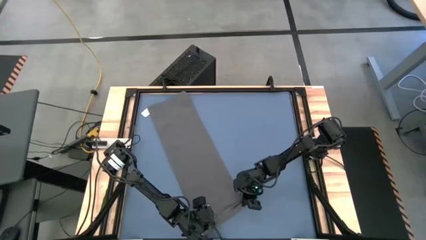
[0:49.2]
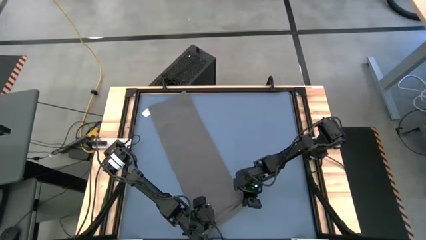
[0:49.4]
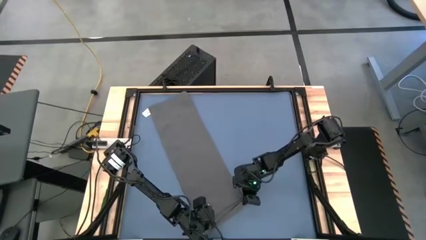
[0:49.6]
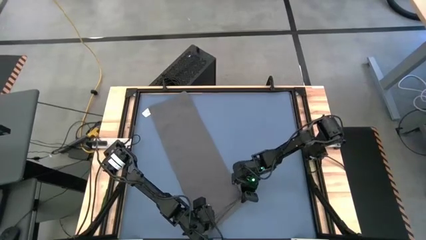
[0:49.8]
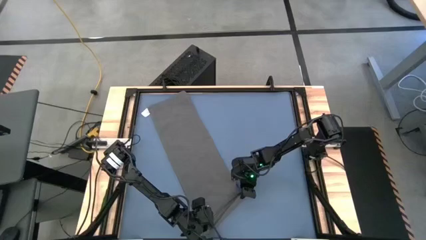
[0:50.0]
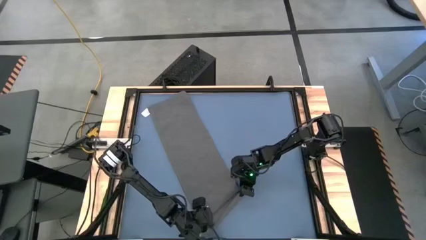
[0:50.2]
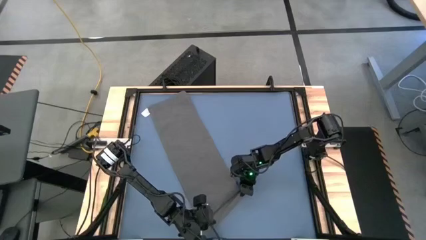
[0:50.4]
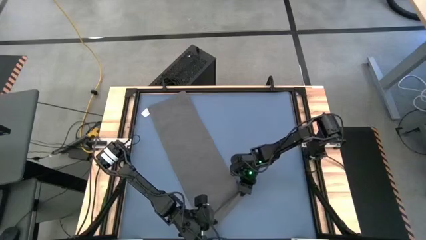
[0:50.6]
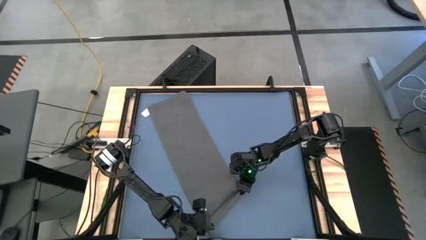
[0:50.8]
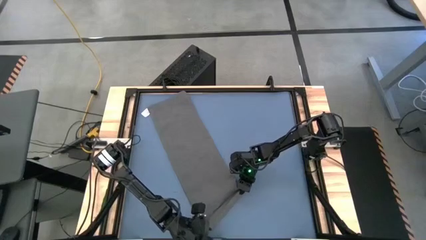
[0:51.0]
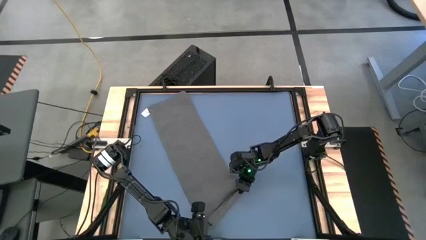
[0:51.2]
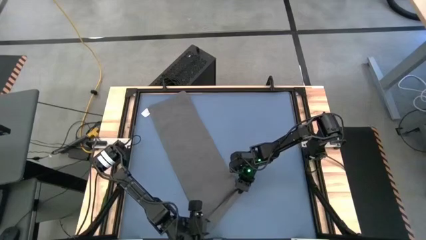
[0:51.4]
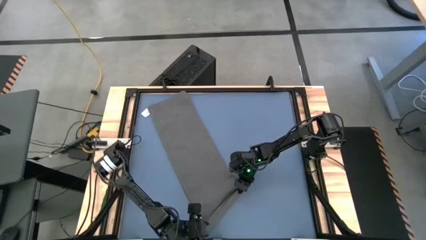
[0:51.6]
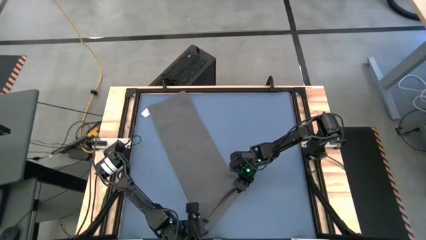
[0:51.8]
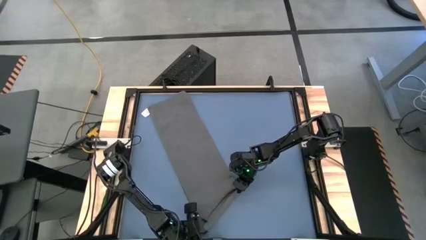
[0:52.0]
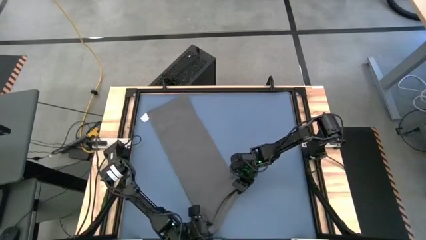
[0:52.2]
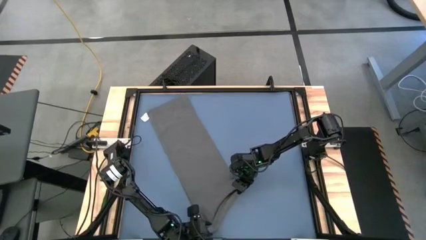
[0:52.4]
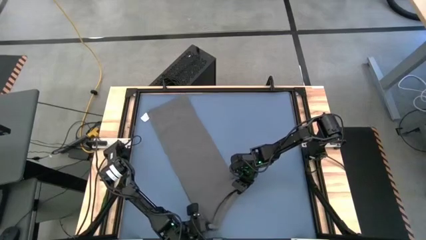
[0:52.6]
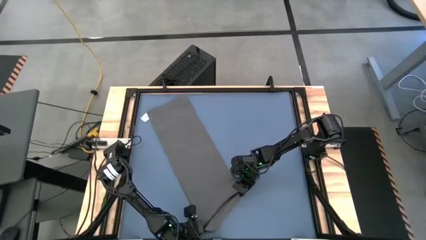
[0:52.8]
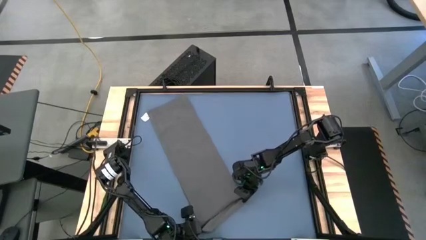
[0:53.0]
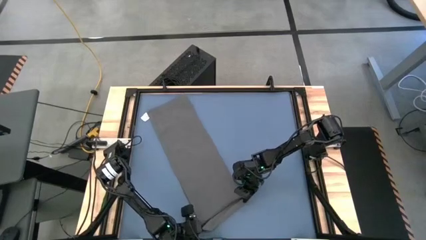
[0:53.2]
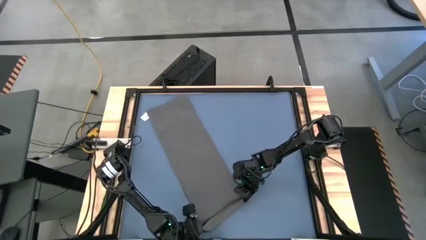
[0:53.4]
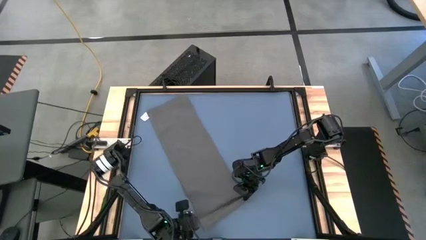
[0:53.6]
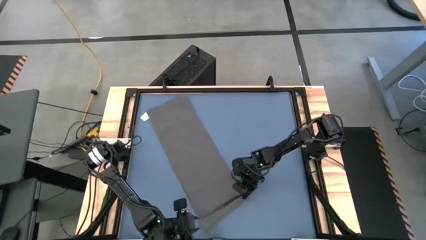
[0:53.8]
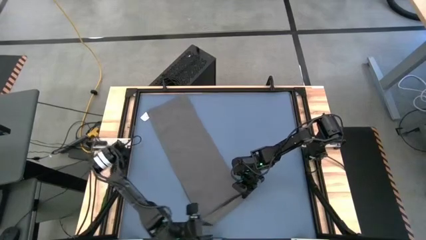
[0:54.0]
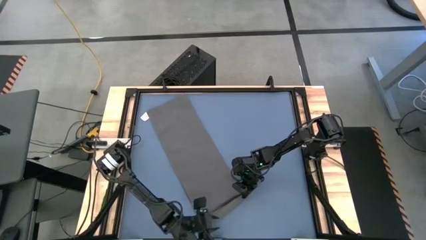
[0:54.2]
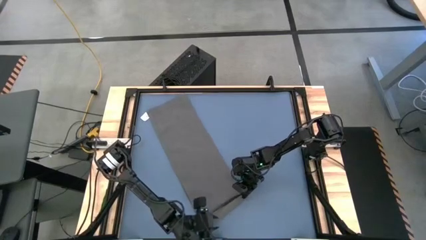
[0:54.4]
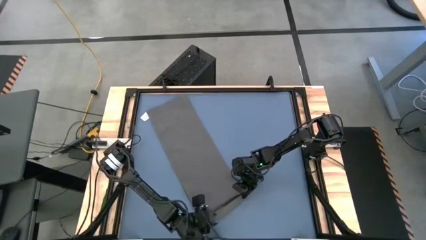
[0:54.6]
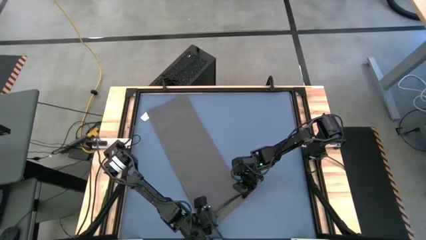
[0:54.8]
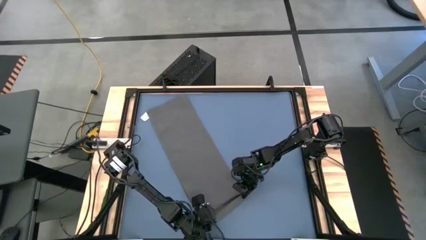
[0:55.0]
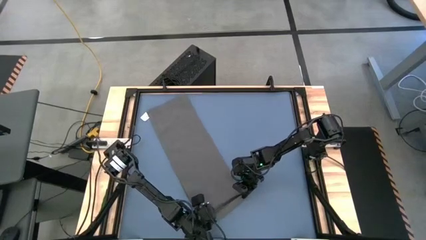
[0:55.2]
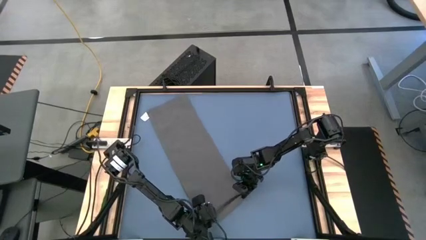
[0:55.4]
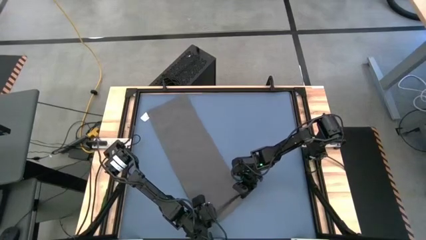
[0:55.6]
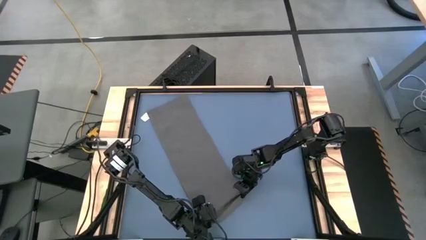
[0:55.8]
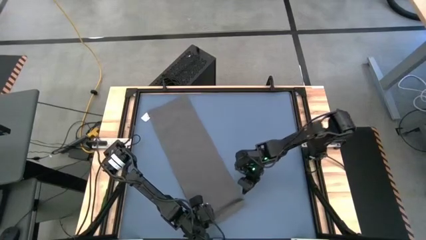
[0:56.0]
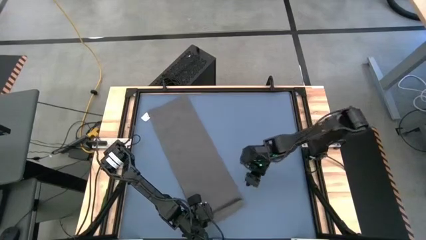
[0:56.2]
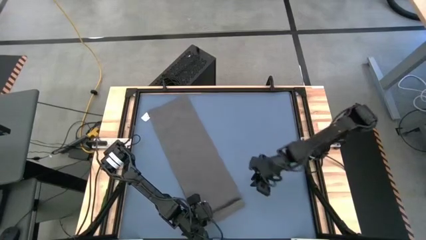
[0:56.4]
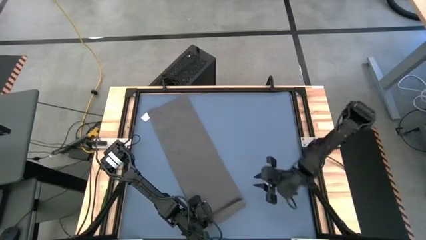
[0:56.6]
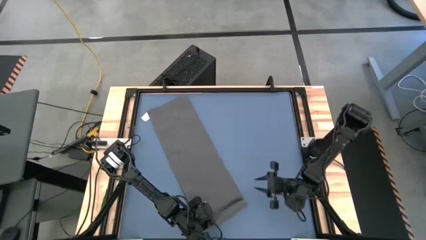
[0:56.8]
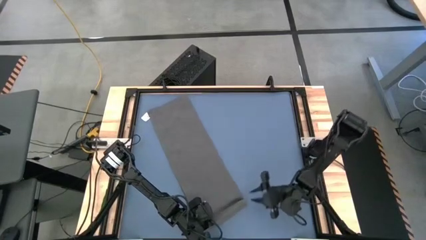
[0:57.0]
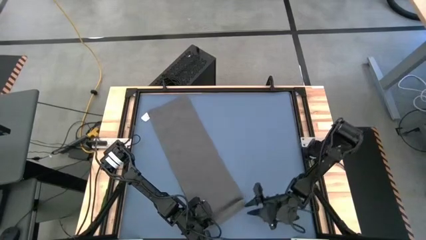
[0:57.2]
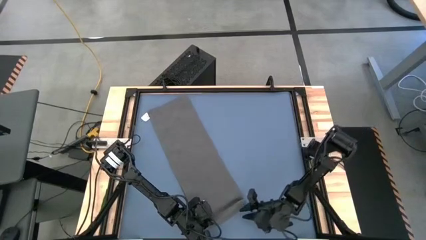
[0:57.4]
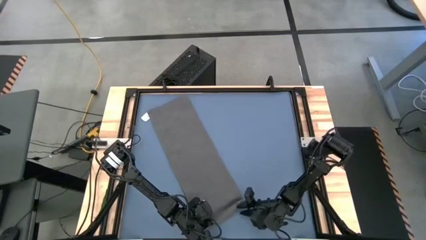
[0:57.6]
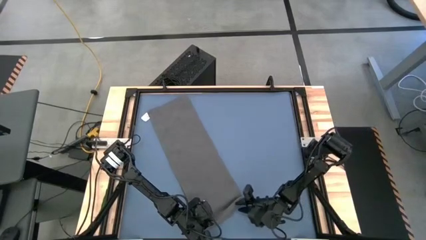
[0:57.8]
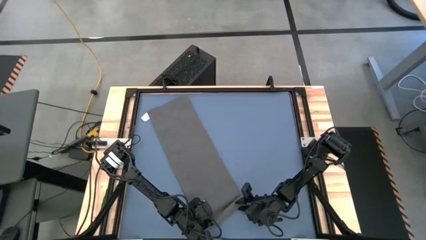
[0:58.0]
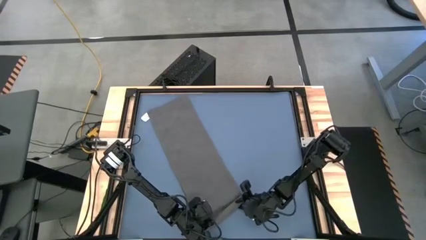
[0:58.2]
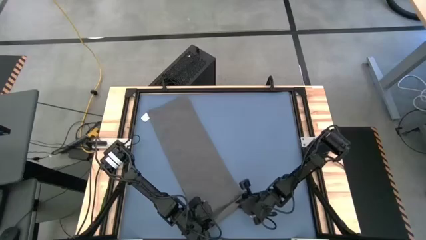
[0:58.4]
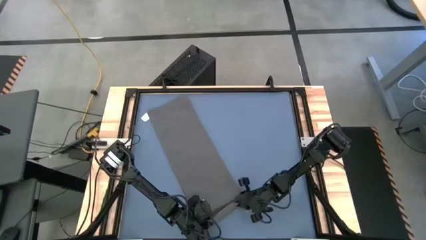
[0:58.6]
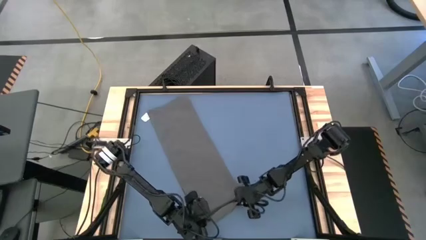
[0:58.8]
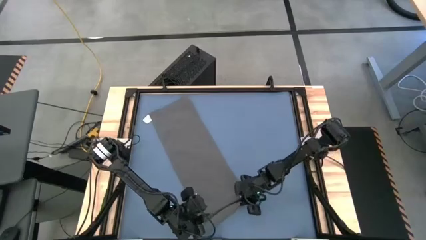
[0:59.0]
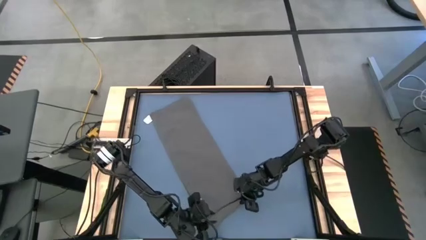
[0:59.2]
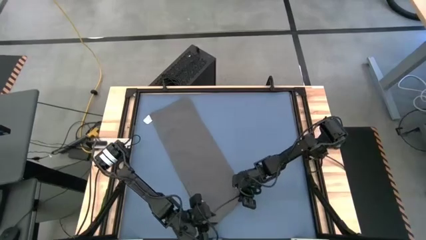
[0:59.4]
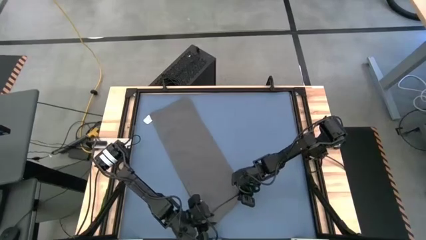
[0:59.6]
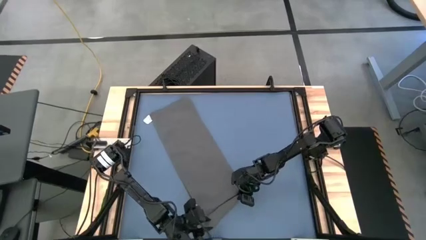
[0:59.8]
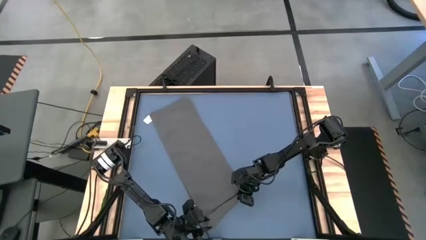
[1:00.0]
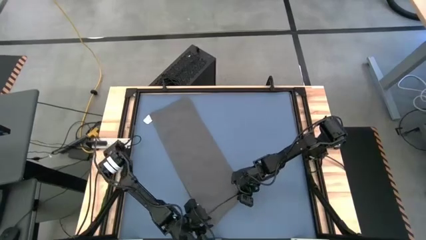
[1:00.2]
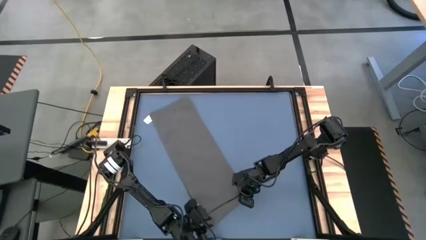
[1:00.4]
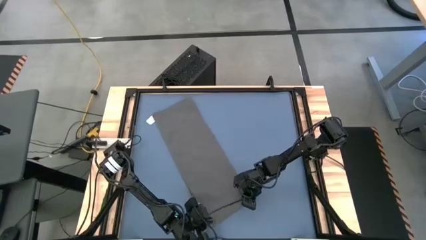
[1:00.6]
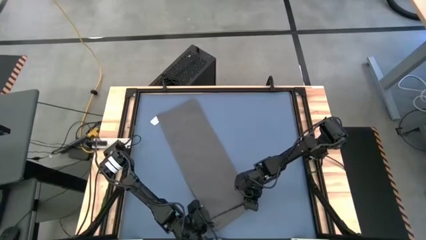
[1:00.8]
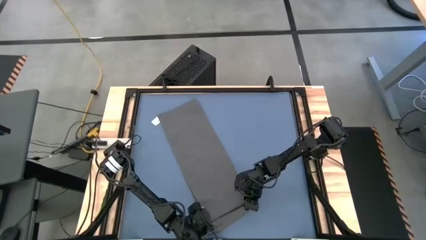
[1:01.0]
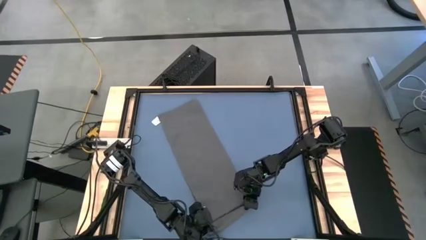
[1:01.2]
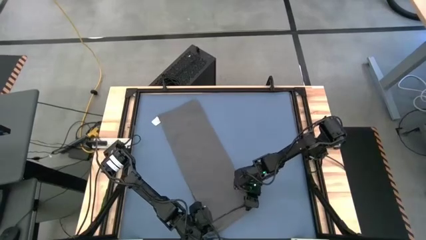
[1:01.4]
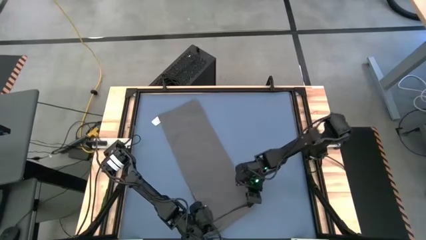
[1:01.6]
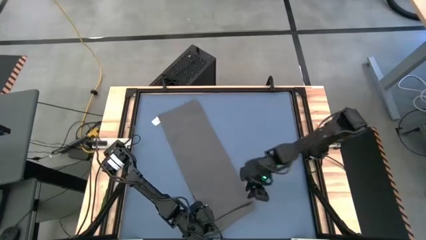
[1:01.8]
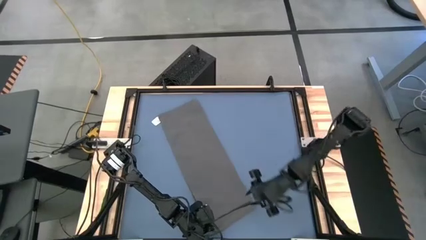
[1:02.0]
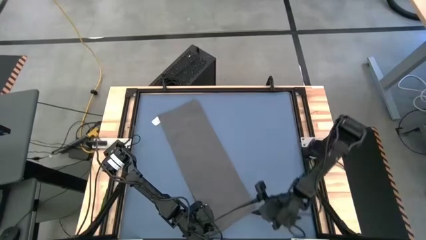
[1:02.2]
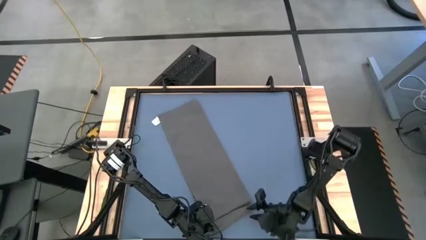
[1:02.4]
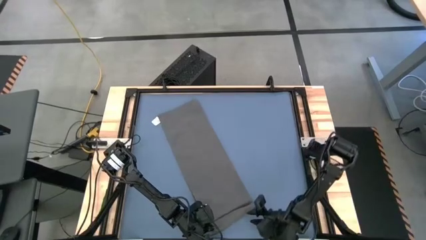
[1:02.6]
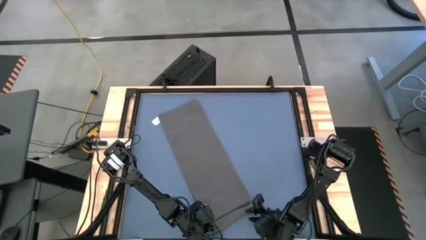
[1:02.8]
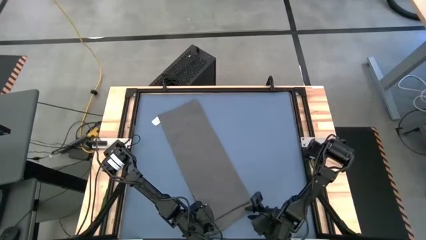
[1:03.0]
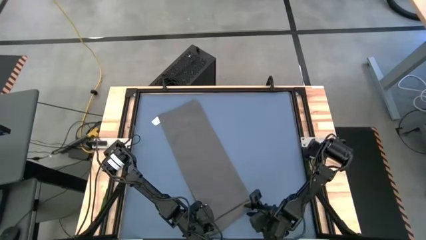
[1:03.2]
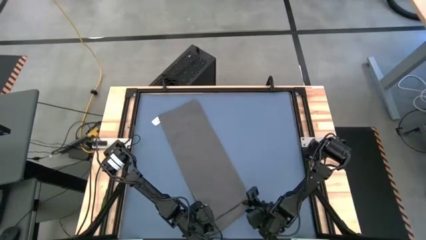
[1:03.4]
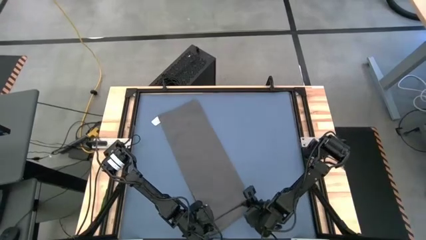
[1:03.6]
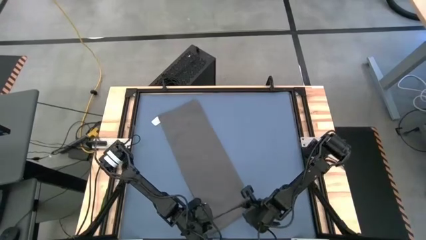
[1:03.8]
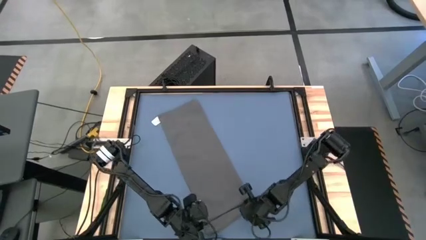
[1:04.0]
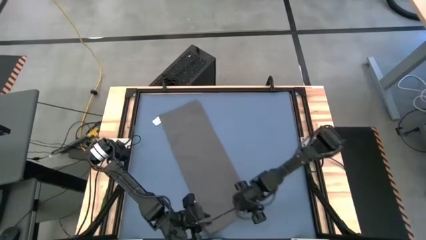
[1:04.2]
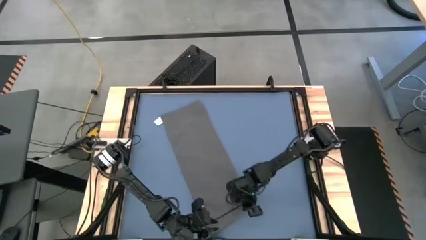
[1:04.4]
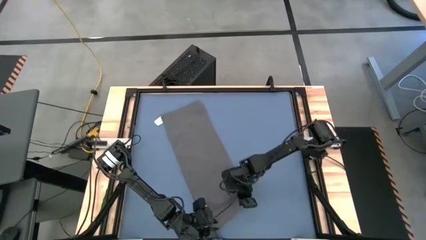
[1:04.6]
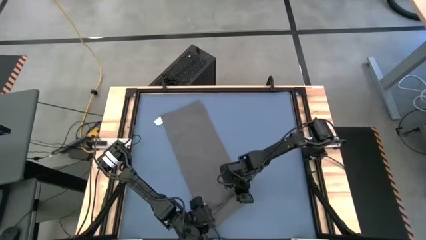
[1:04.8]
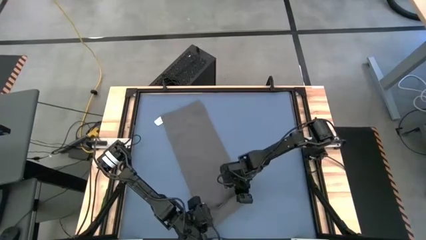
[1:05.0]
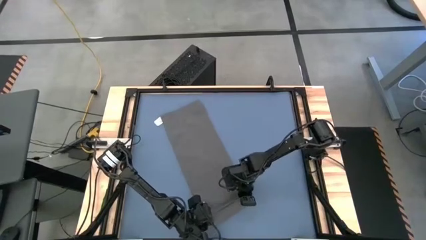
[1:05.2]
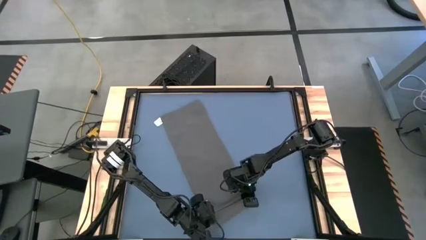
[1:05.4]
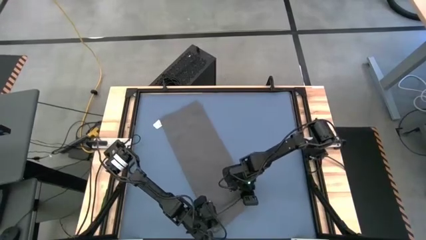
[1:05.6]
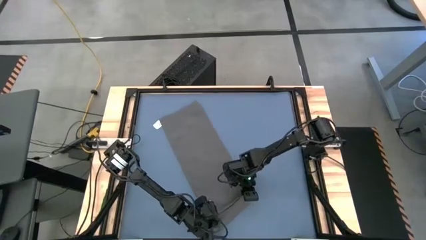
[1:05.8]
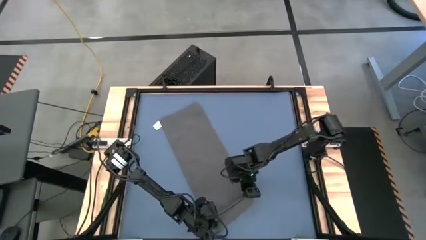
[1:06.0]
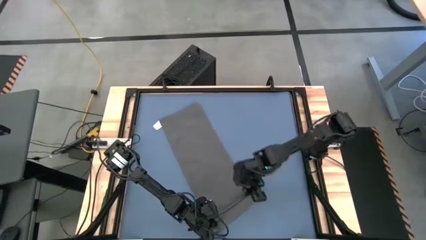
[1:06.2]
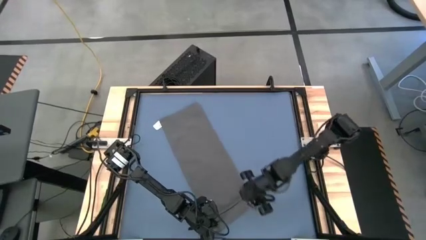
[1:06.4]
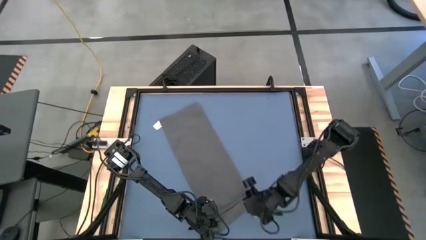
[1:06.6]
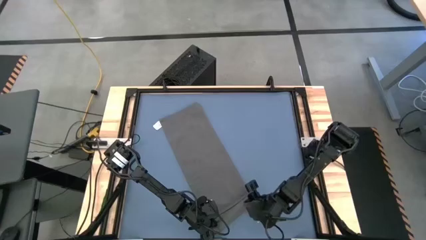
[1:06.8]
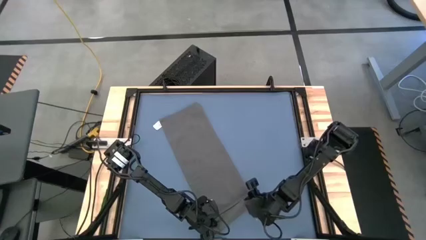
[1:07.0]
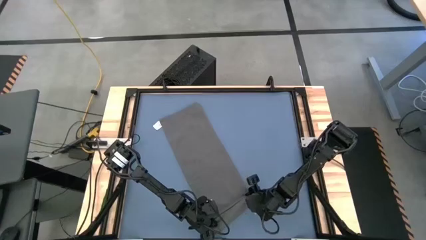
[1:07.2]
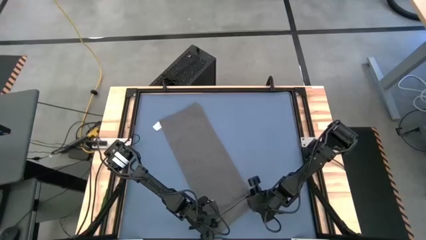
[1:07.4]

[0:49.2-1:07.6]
Task: Roll towel into tight, uniform cylinder
Roll the gray towel
